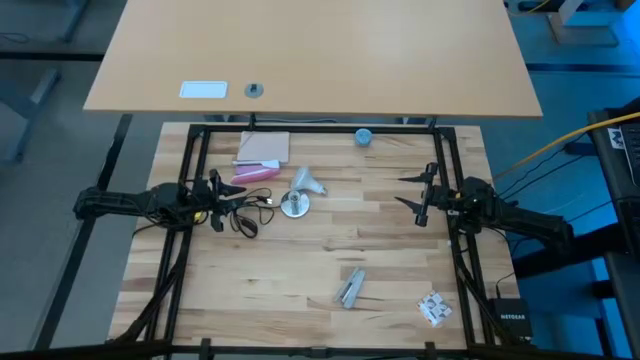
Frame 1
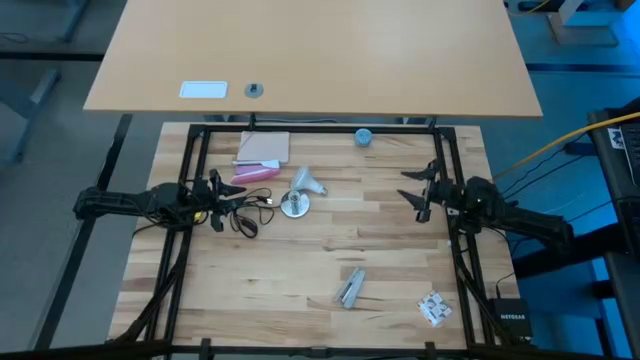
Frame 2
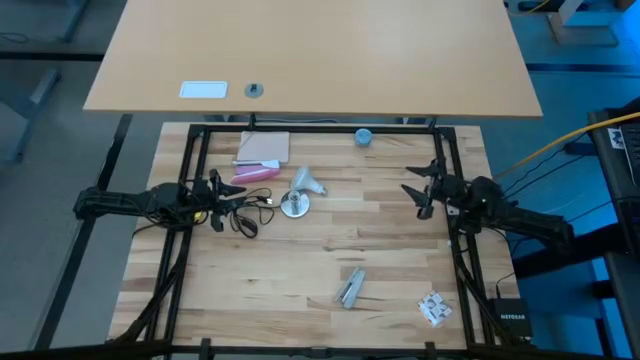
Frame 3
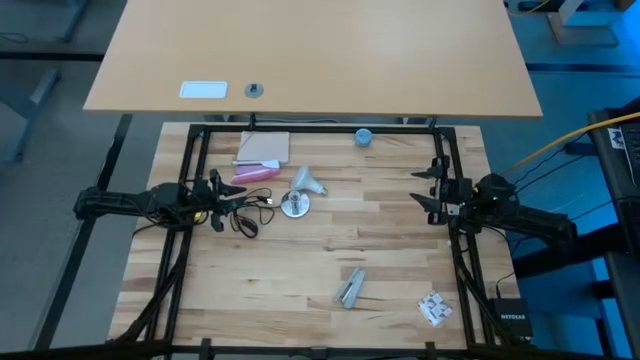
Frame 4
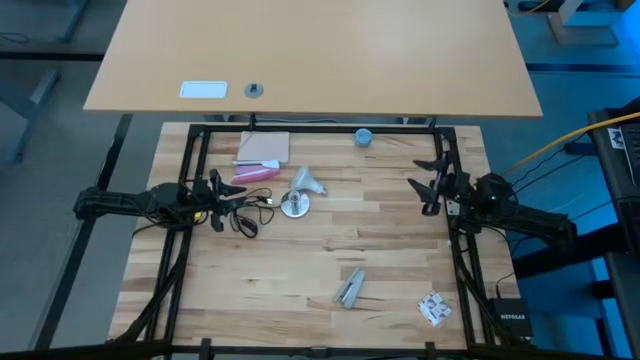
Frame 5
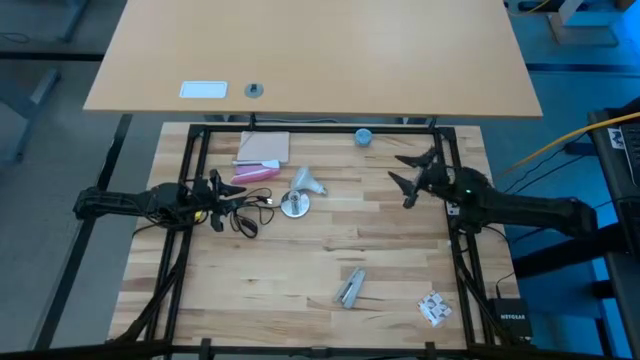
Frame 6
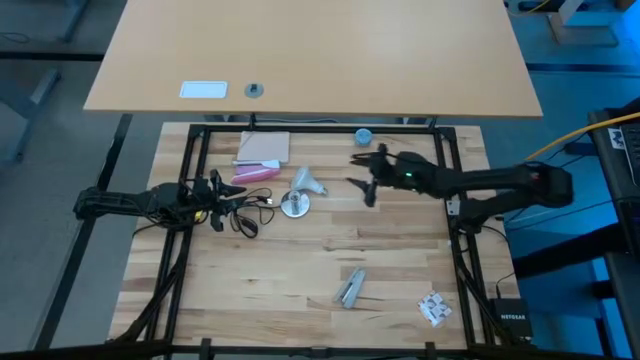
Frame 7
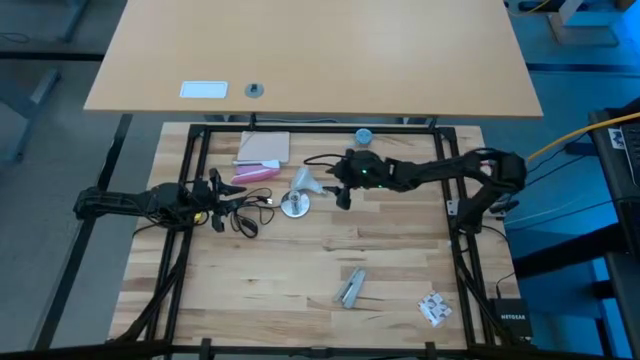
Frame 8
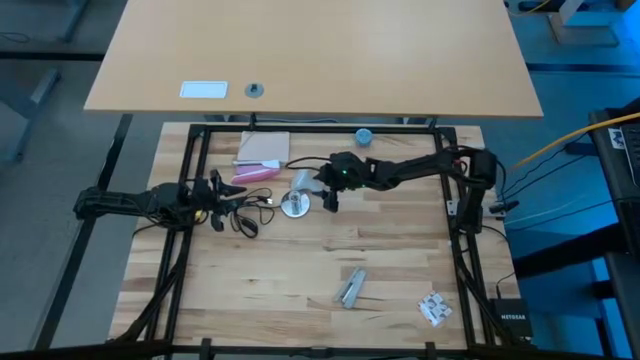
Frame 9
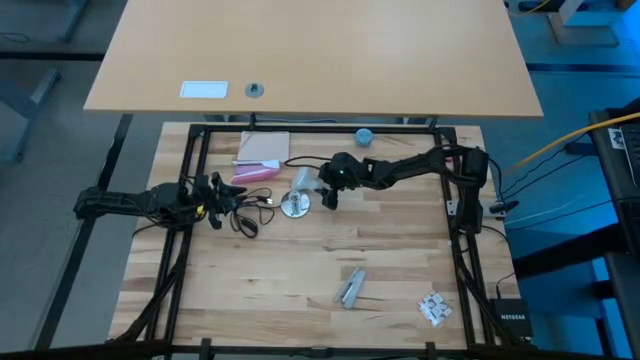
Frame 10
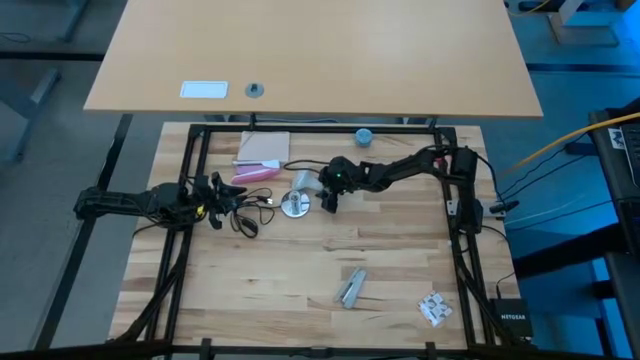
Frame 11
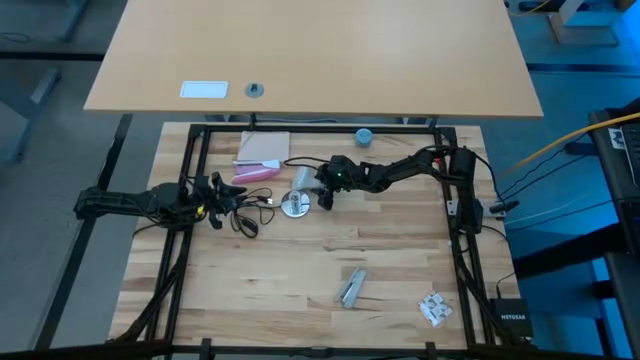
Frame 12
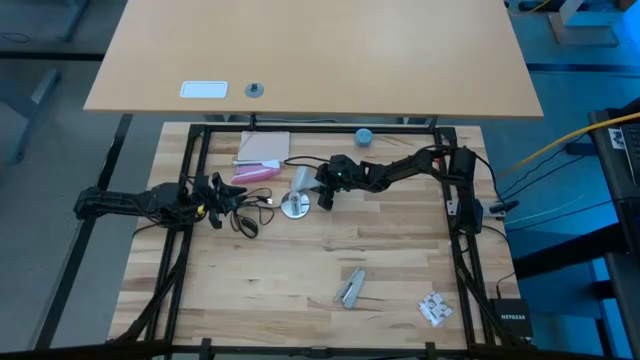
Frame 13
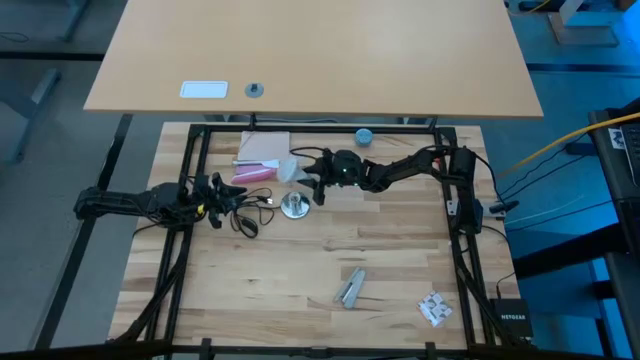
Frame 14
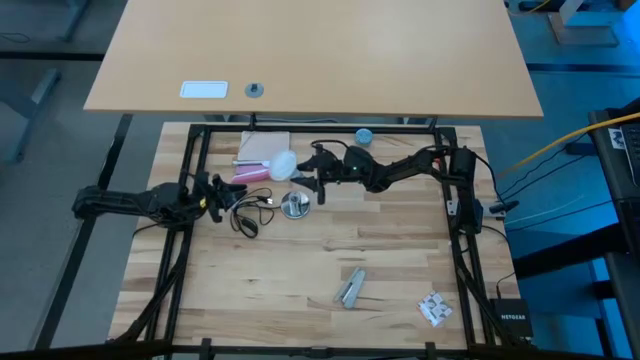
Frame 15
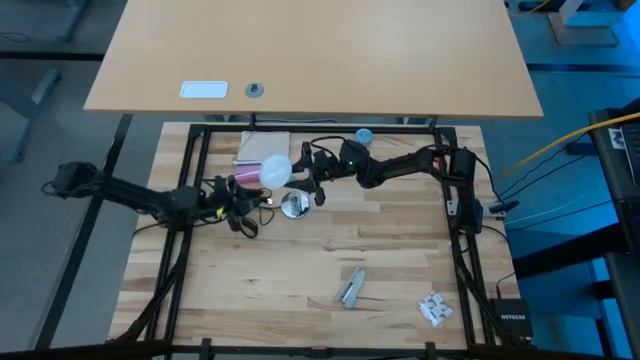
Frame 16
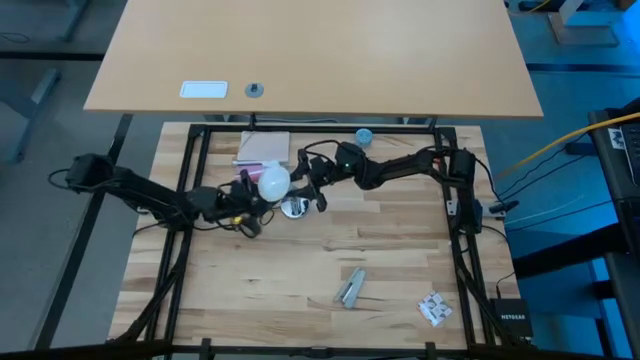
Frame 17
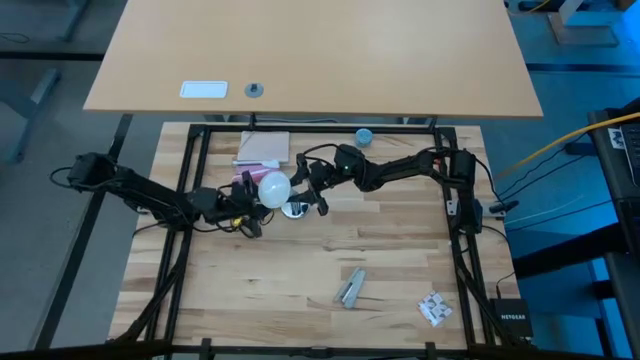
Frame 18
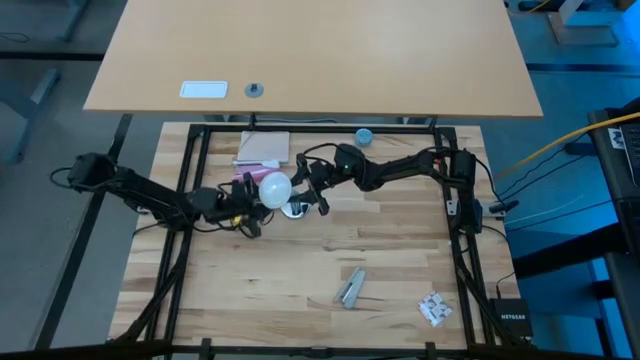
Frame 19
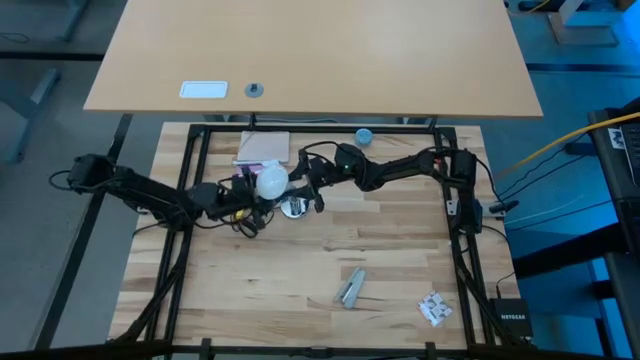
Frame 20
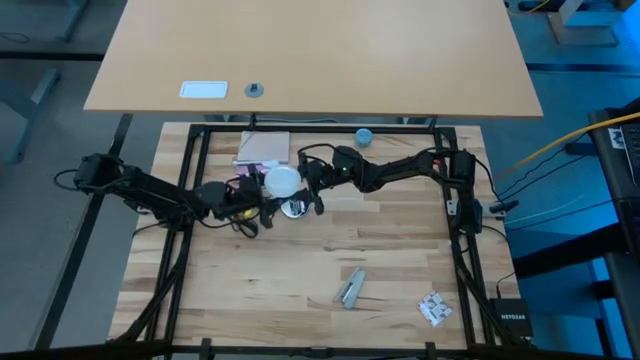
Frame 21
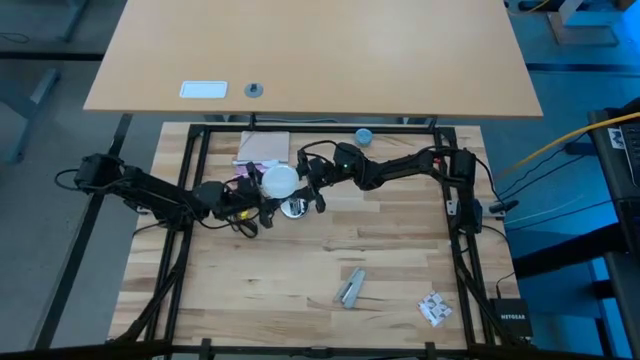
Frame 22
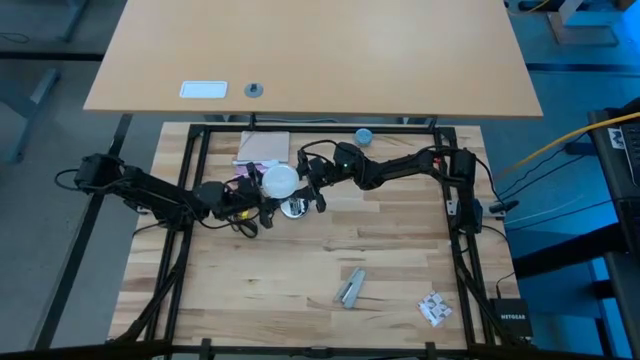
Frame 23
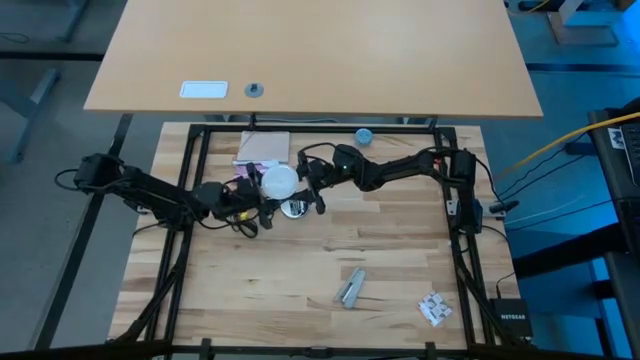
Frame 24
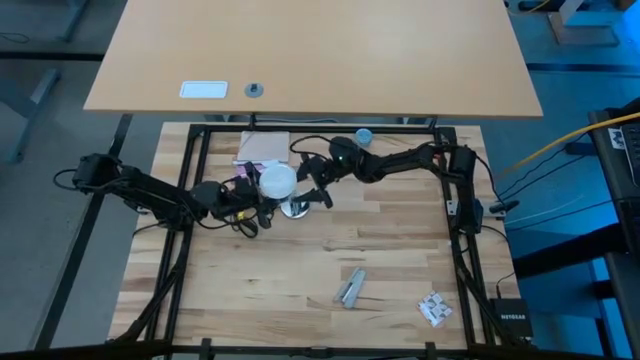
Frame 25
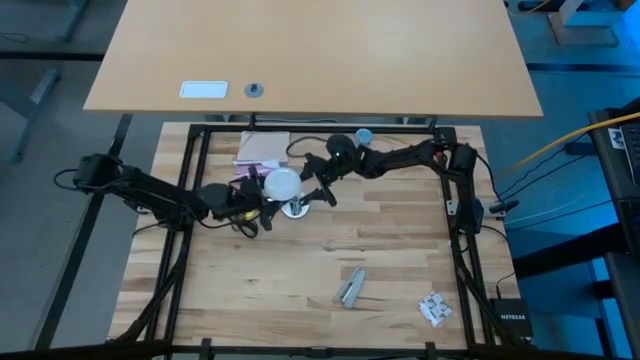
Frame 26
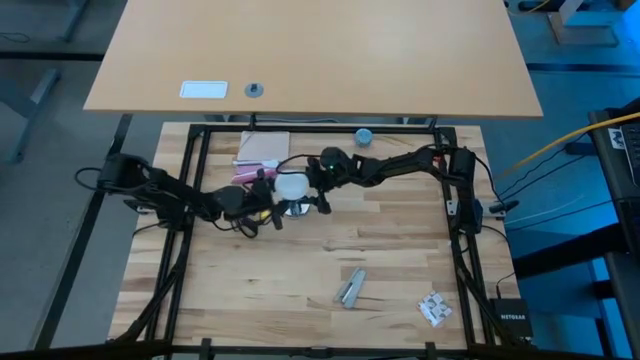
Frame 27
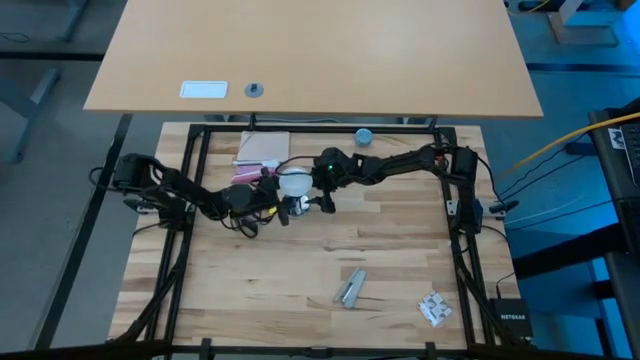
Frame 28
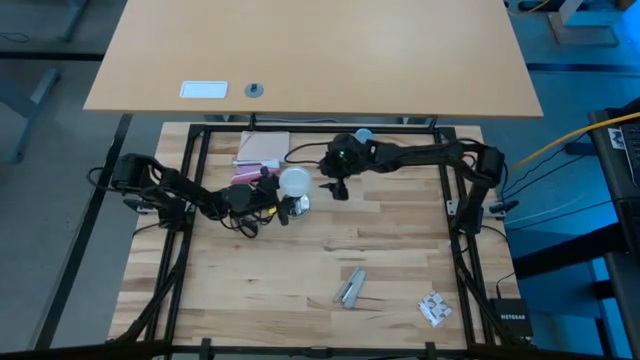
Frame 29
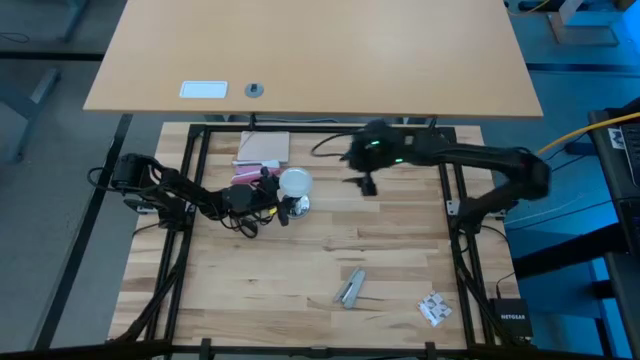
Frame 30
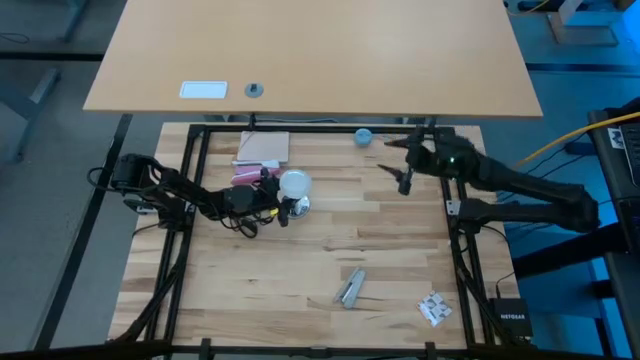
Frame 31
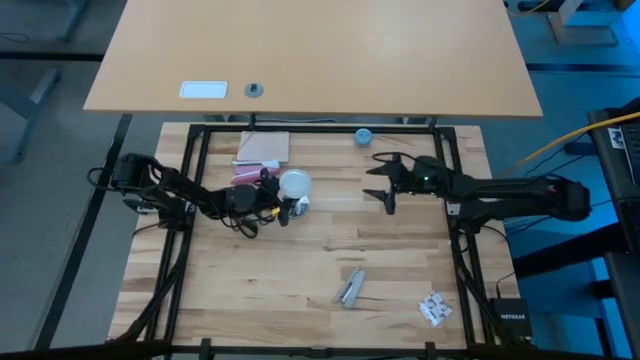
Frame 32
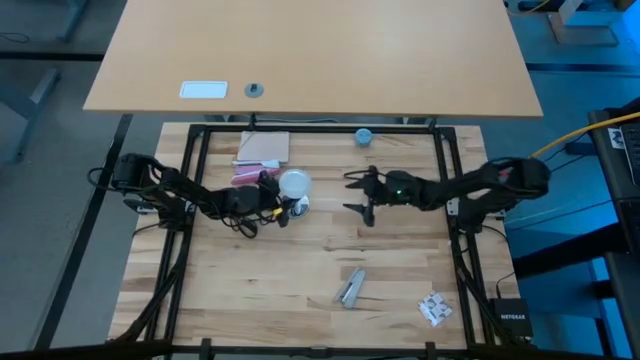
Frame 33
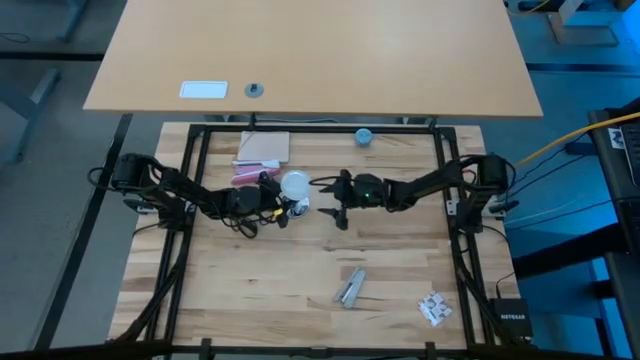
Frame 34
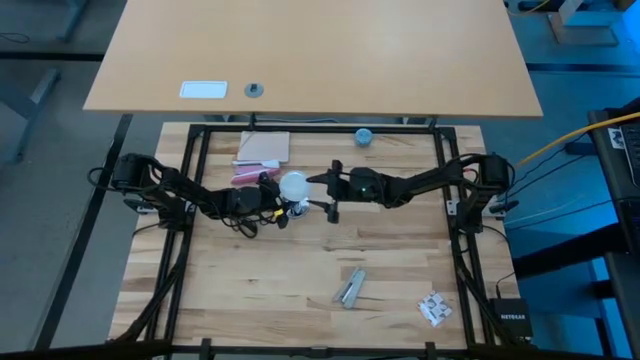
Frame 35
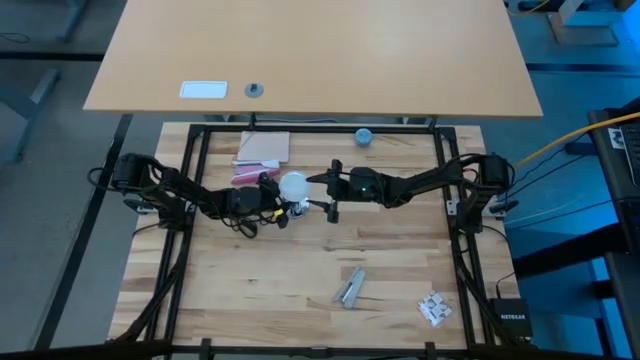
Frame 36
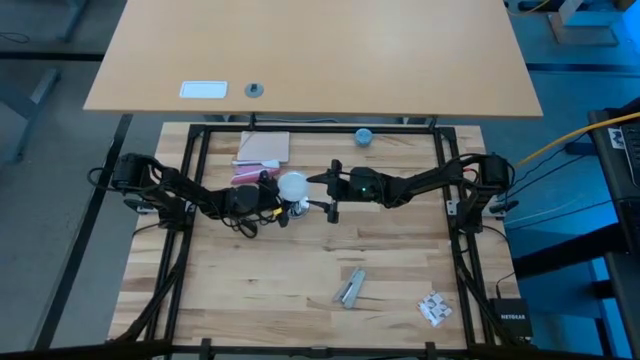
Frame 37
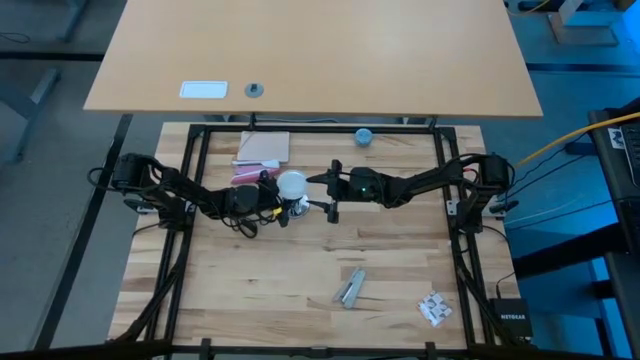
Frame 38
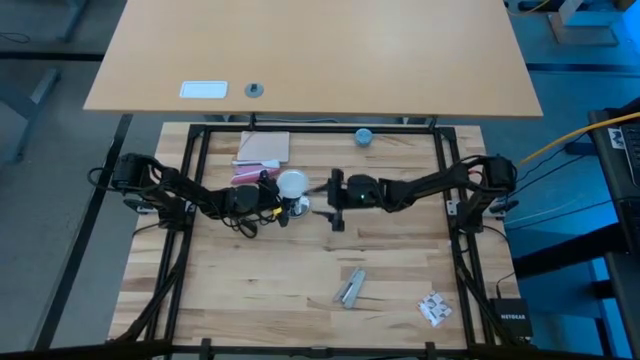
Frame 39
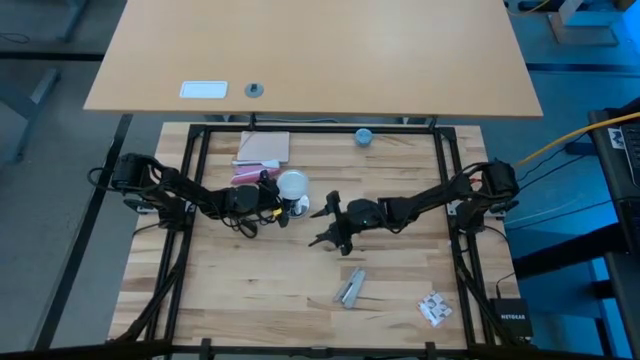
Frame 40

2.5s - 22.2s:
Task: Screw lightbulb
Insert the lightbulb into the lamp
